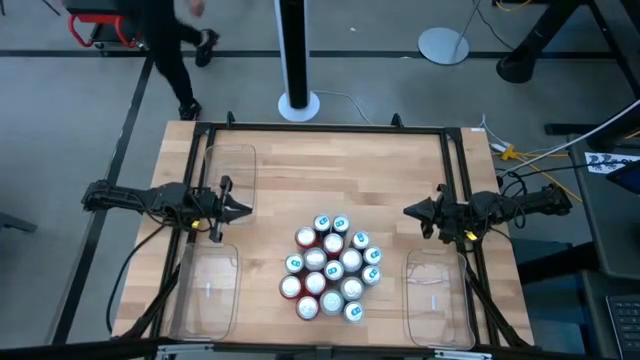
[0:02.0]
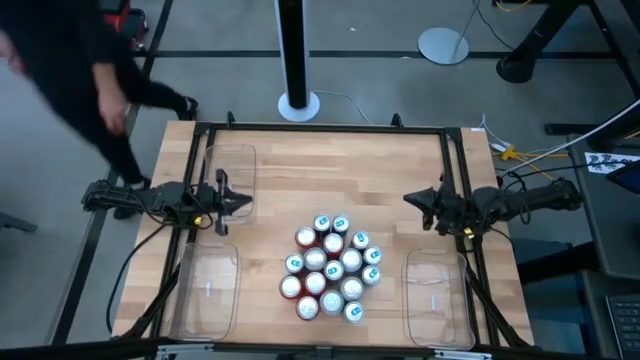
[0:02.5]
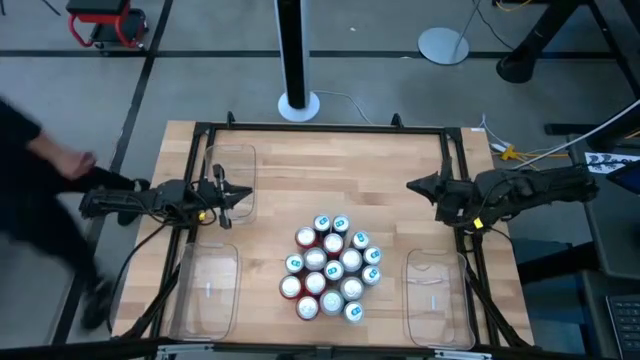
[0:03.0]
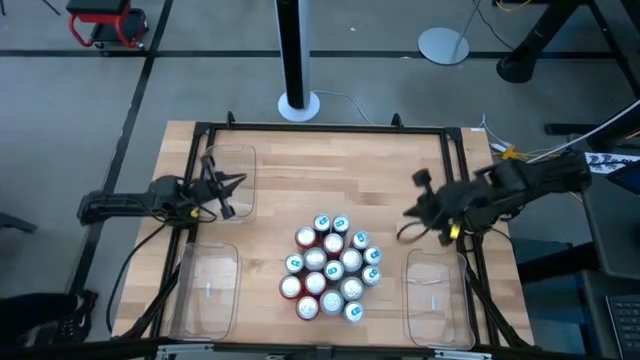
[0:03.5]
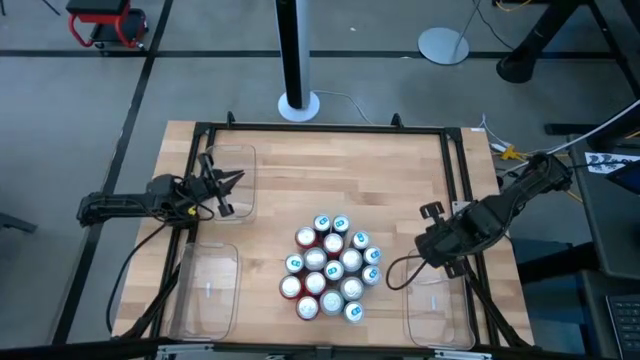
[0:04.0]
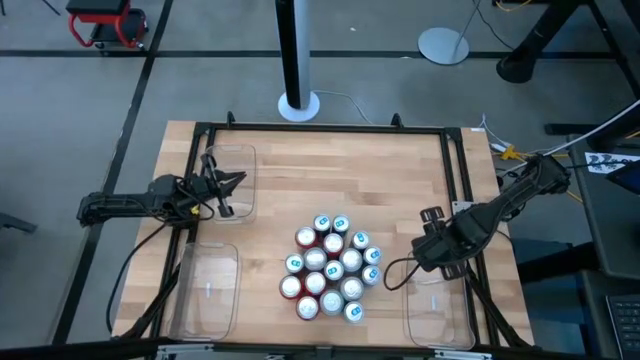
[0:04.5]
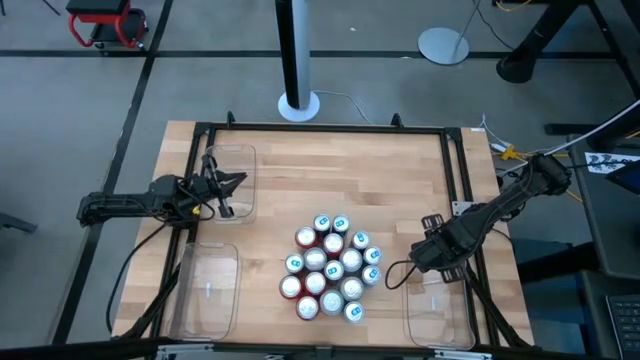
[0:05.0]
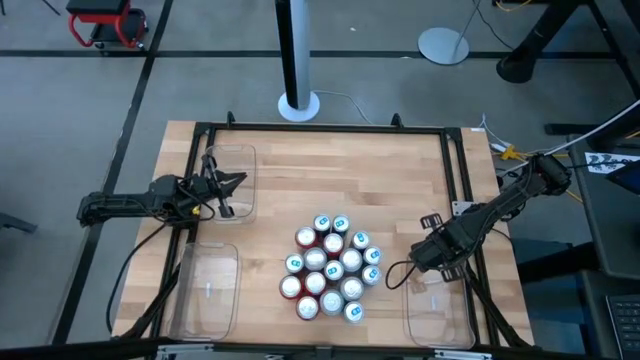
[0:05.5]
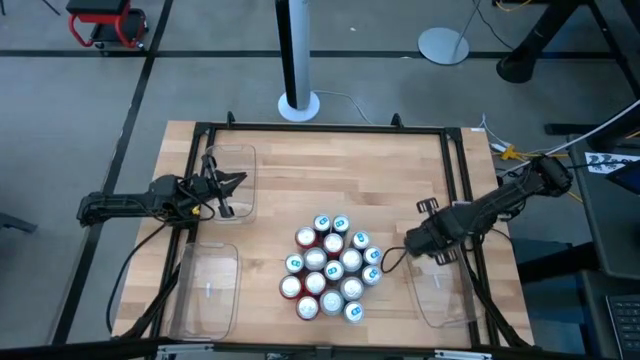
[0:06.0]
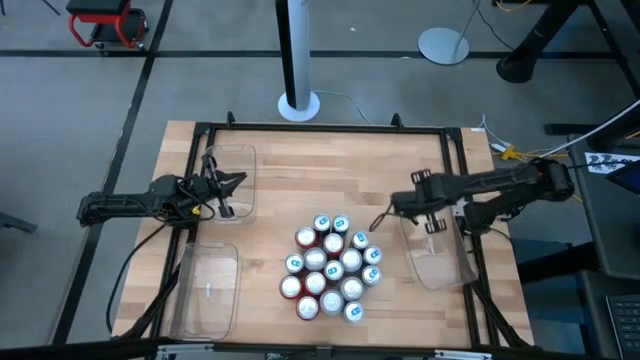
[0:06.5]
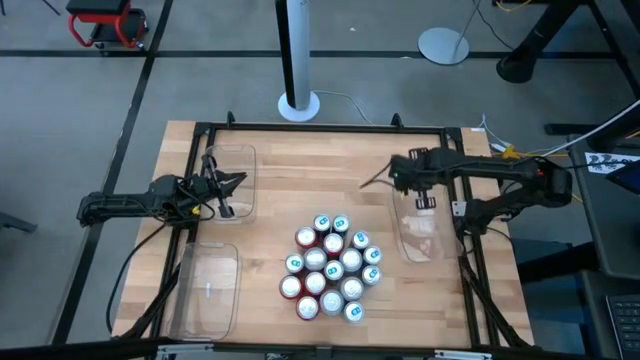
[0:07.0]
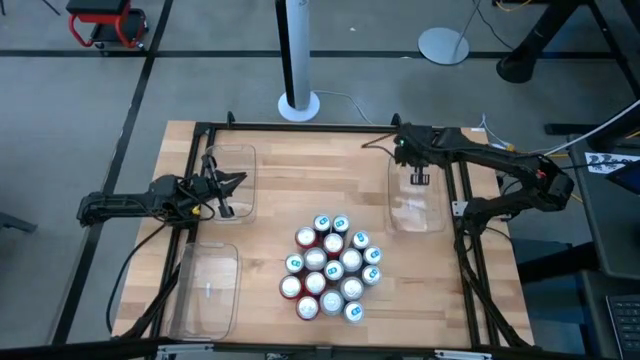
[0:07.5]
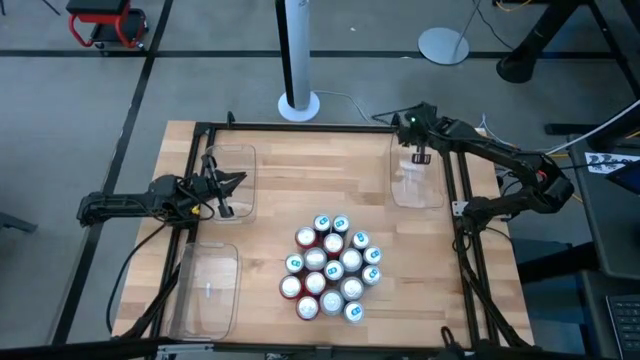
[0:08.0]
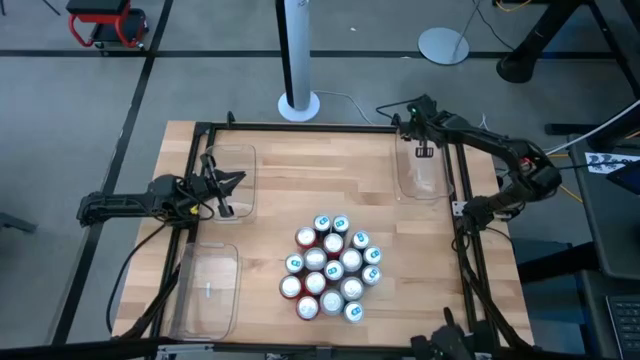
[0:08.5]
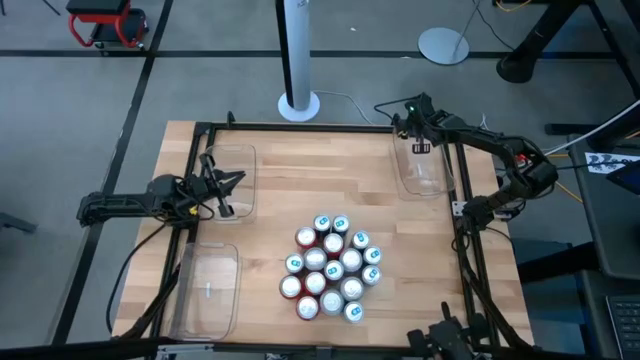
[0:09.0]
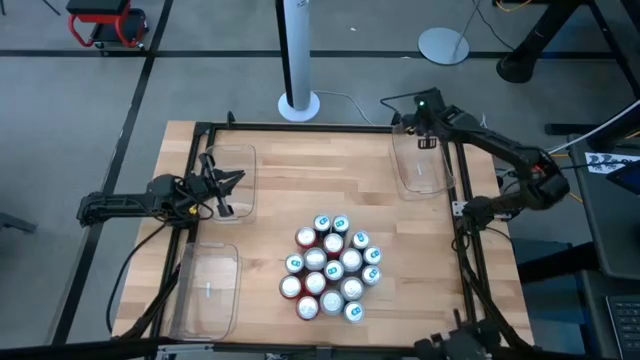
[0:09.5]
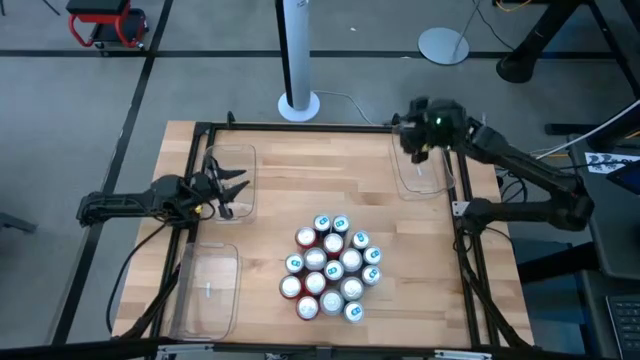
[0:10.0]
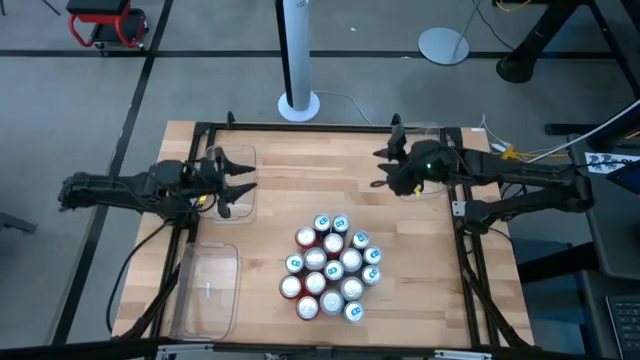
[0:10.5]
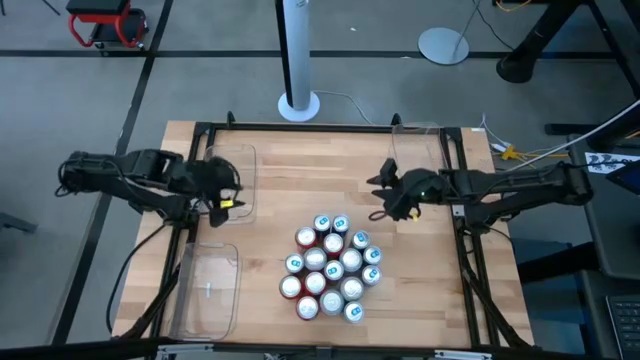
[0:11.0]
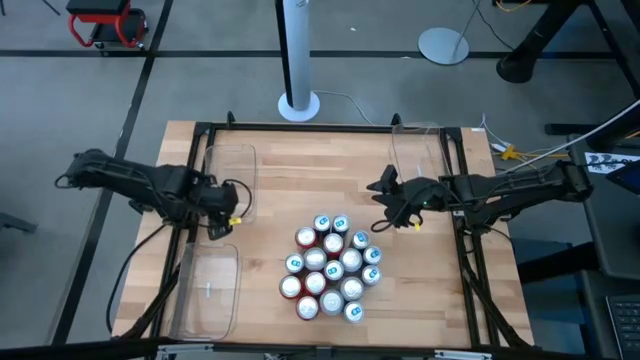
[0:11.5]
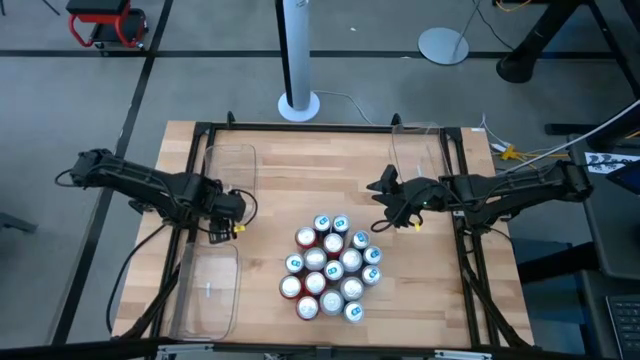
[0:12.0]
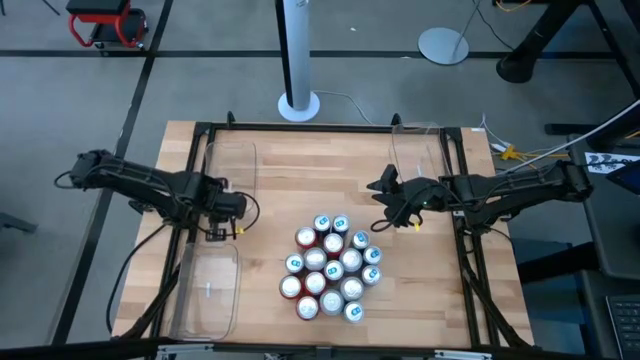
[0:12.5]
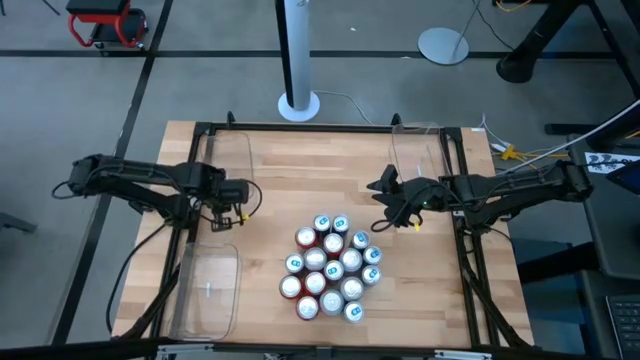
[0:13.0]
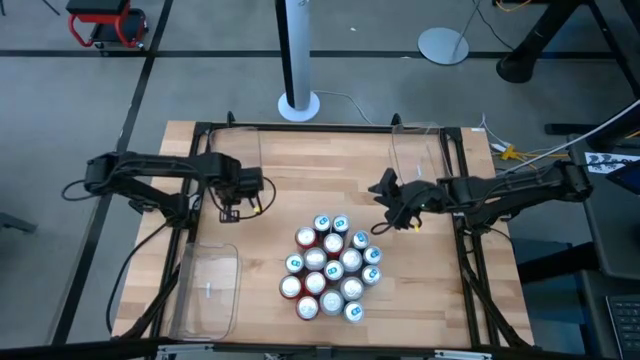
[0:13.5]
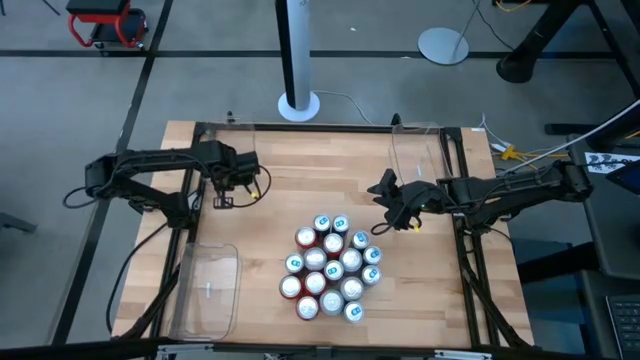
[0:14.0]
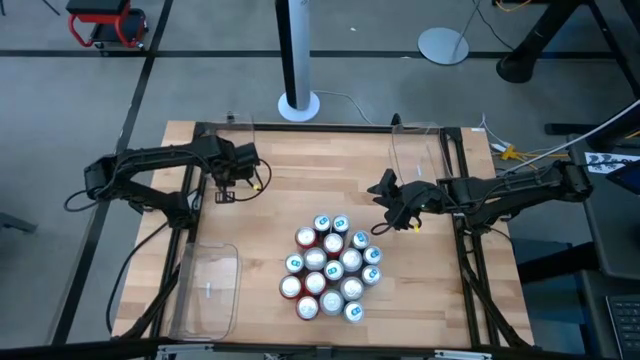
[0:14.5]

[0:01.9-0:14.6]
Task: Sort soda cans
Move the transparent bins into the top middle

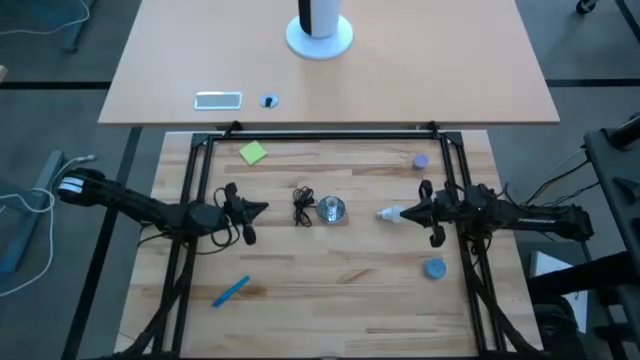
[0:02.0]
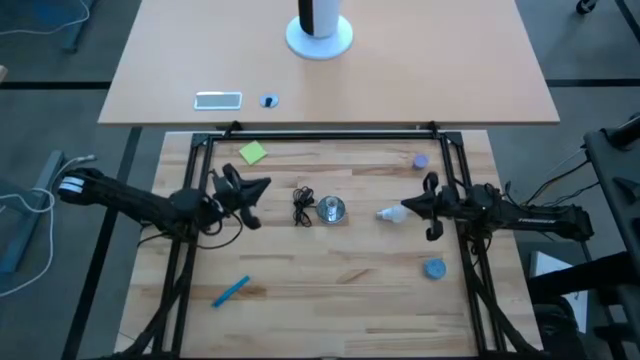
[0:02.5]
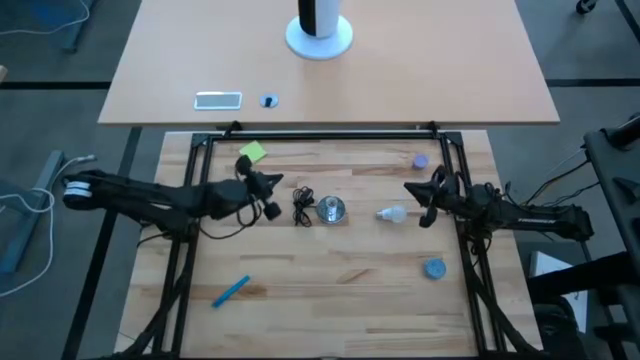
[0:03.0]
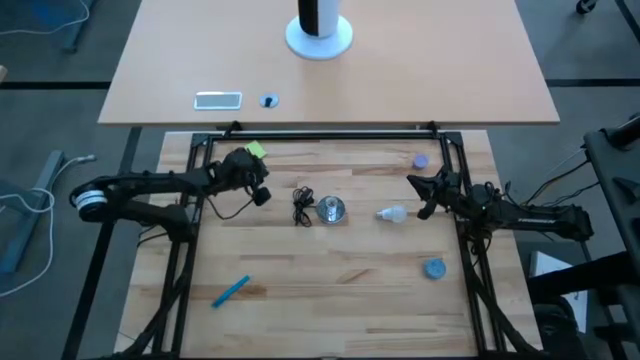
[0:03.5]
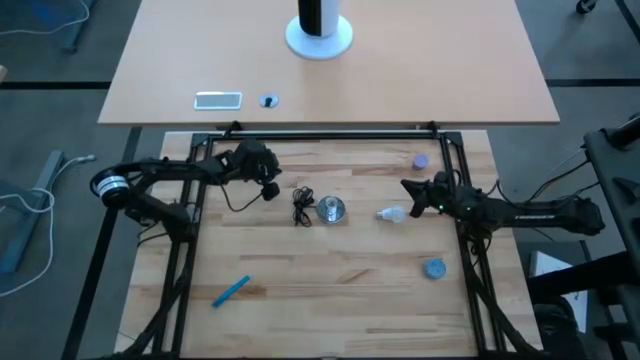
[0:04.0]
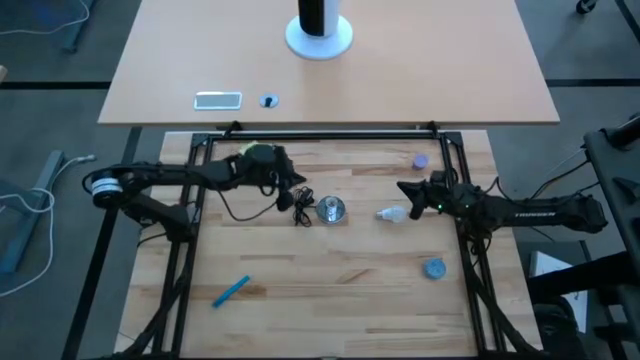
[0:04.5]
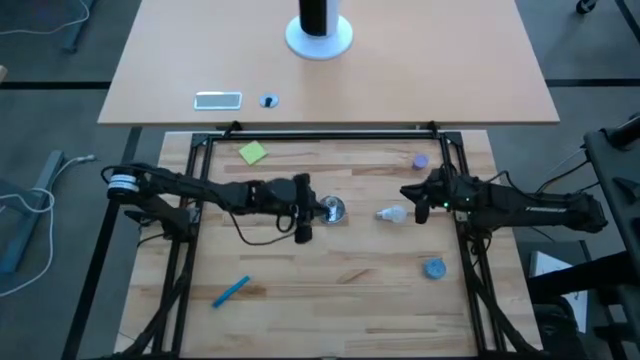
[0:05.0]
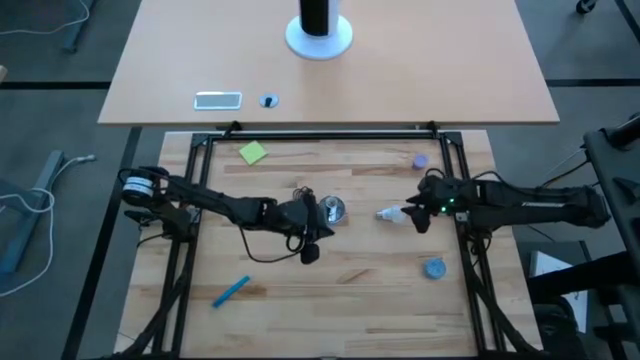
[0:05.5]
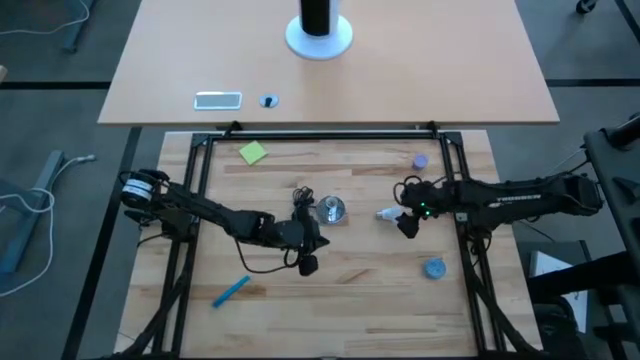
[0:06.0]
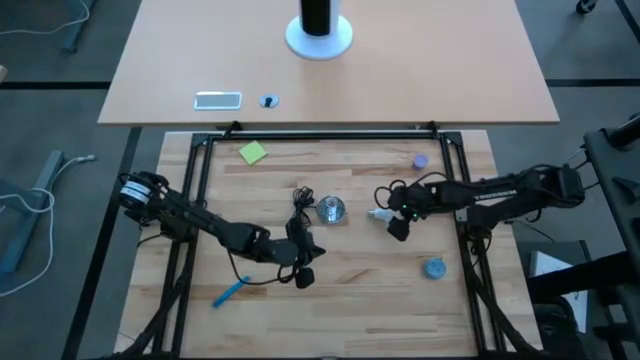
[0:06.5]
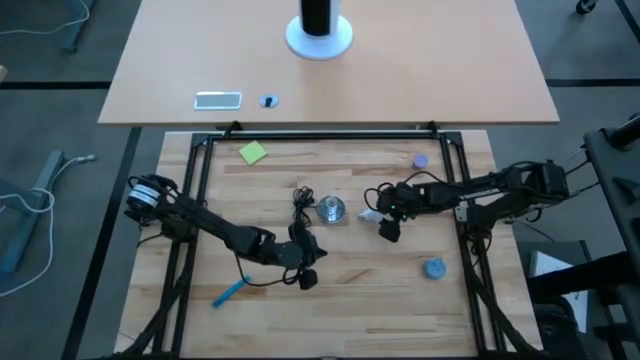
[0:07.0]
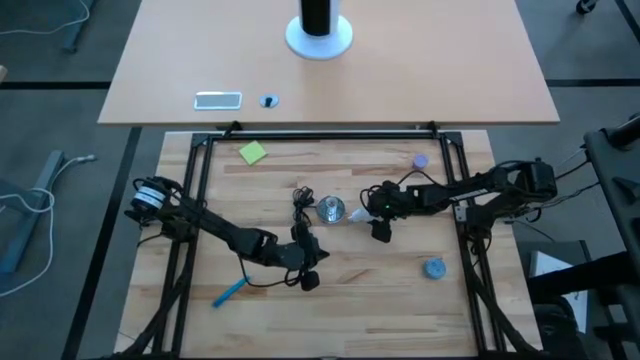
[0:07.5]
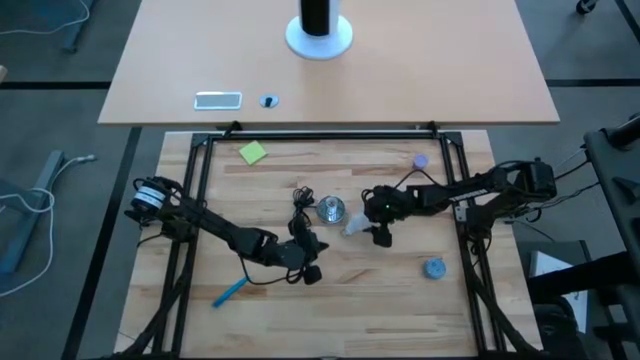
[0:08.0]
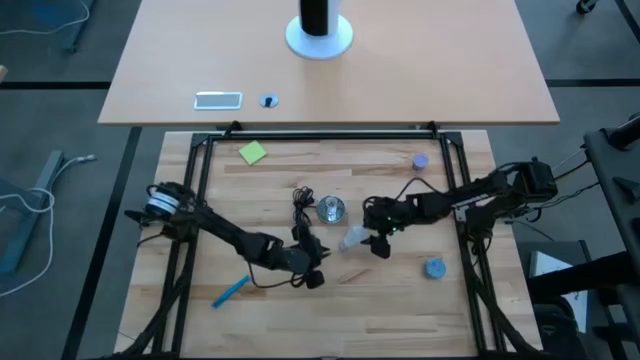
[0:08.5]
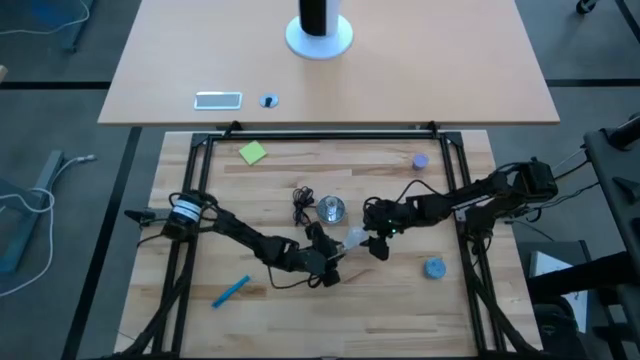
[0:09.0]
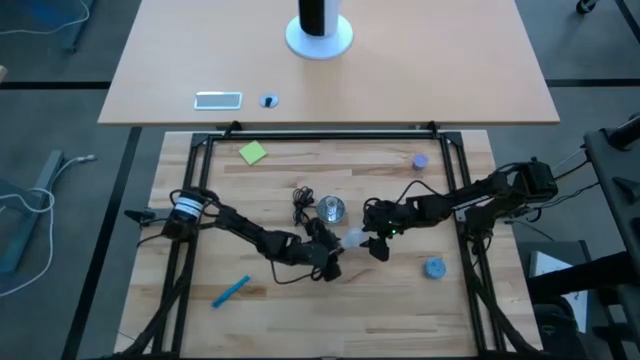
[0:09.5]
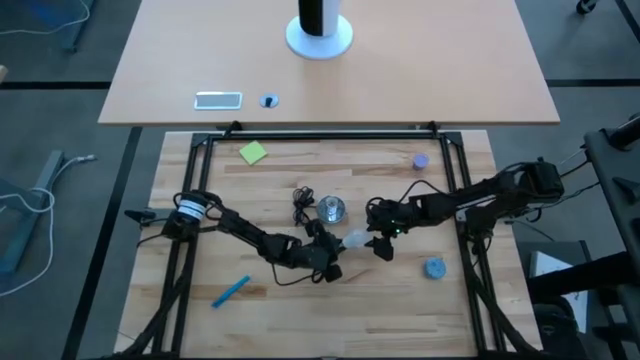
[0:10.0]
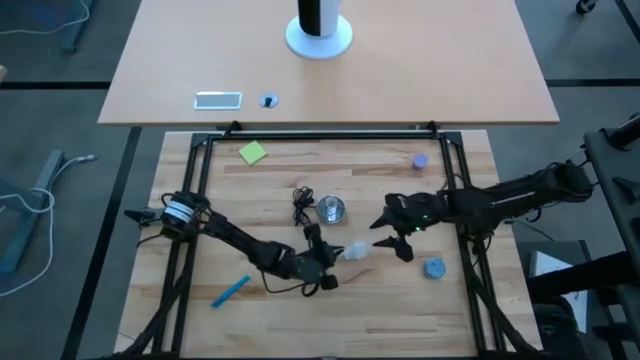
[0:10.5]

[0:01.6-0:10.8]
Task: Screw lightbulb
Insert the lightbulb into the lamp
